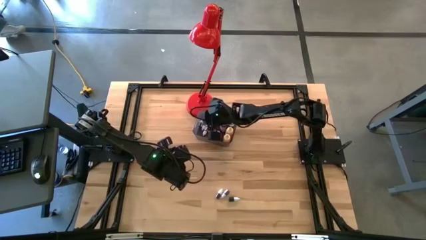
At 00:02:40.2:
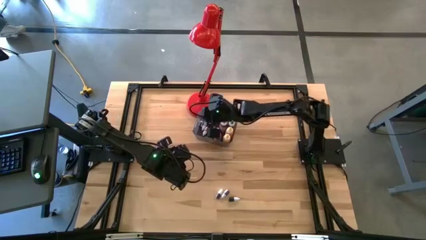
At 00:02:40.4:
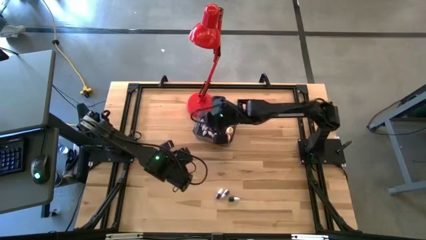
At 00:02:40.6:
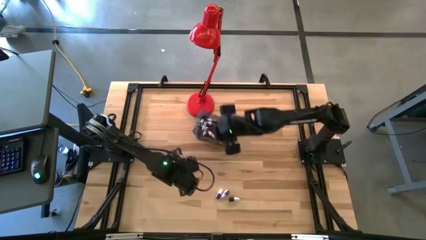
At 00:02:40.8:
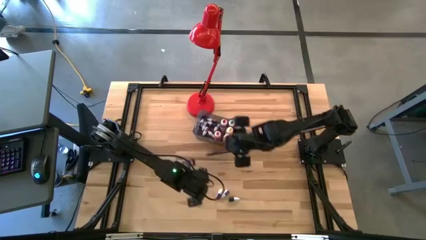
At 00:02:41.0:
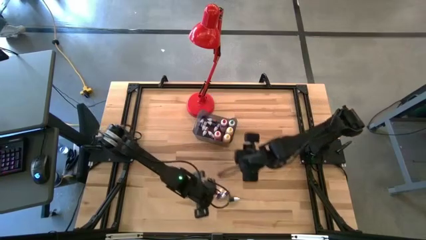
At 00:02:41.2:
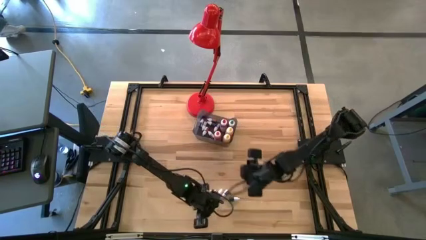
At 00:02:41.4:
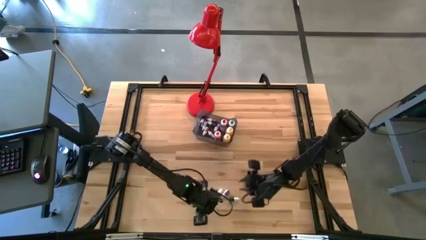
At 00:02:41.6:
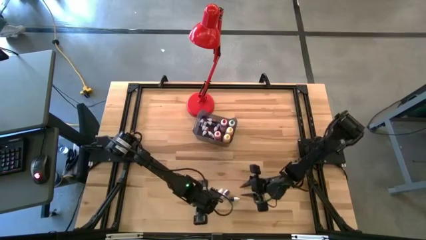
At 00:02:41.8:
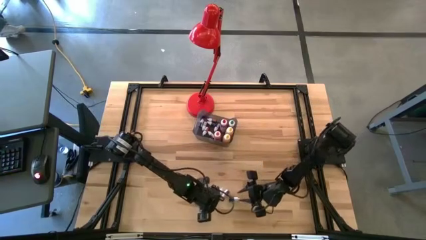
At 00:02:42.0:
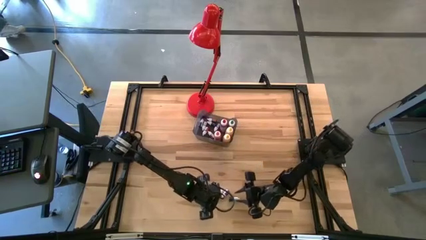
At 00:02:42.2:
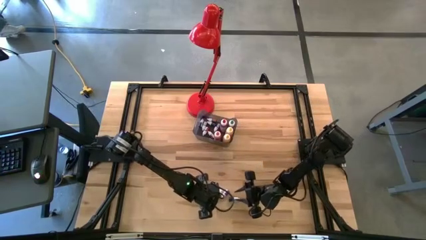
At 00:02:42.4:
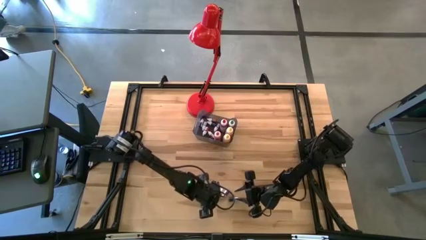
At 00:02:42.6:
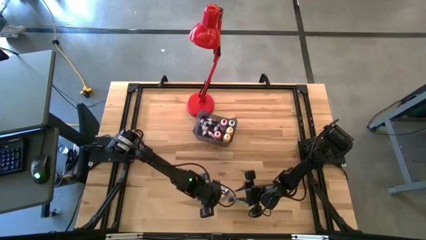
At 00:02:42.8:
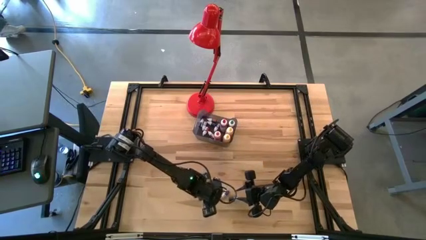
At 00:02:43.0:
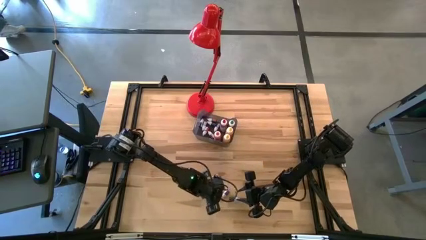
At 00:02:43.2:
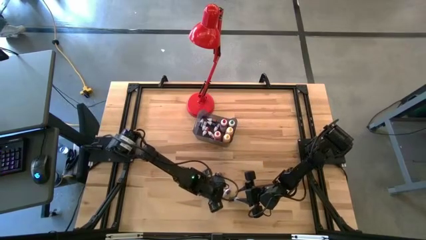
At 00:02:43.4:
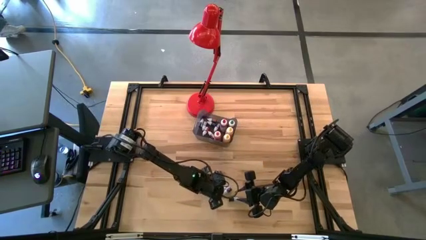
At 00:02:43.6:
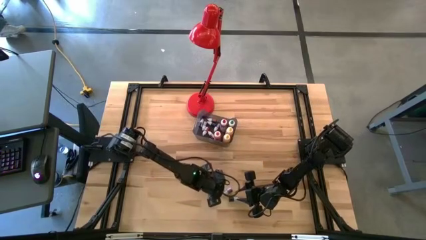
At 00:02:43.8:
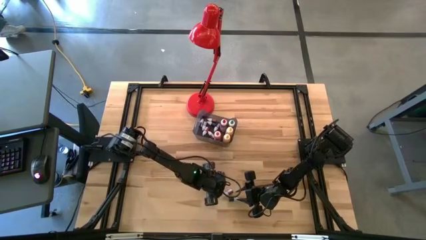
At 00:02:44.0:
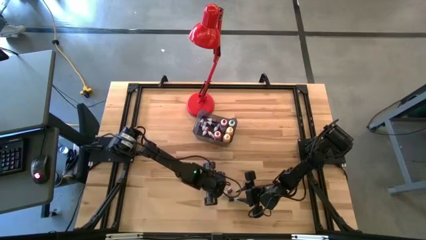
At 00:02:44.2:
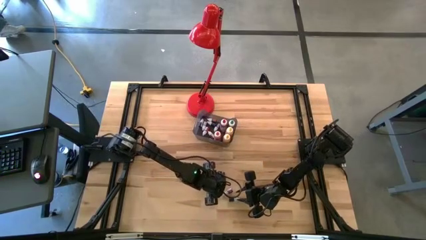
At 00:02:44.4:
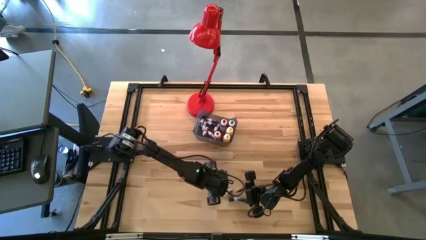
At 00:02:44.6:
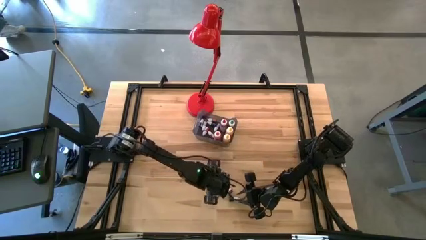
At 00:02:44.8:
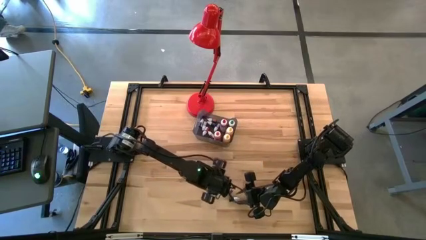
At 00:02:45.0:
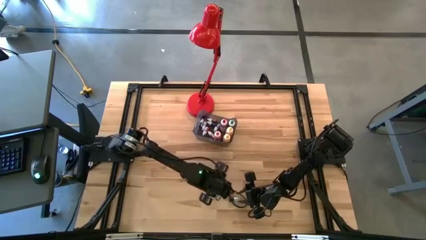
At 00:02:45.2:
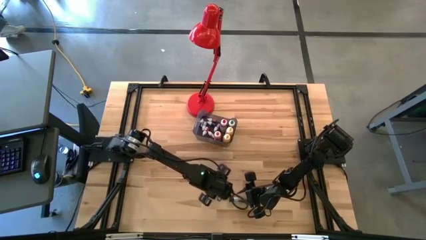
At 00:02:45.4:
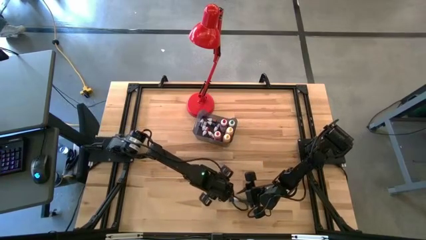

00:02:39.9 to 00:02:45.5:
Task: Pick & Place food coloring
Put the small pink food coloring bottle into the black bin

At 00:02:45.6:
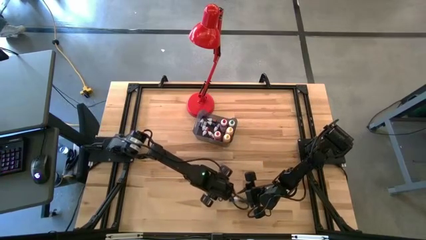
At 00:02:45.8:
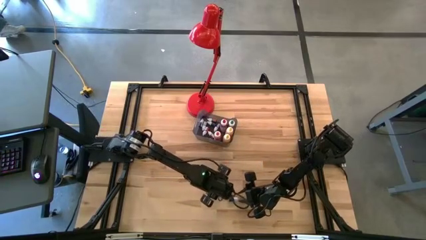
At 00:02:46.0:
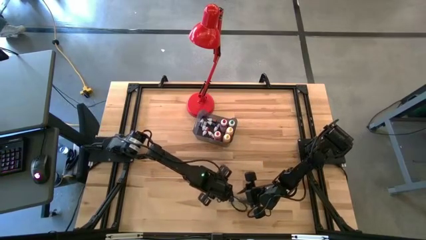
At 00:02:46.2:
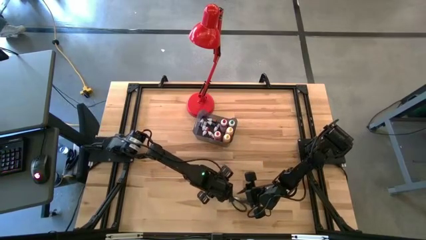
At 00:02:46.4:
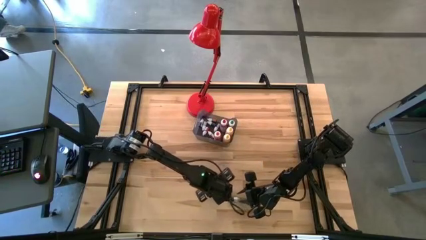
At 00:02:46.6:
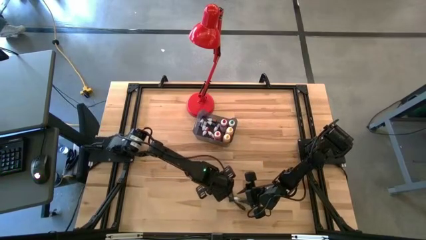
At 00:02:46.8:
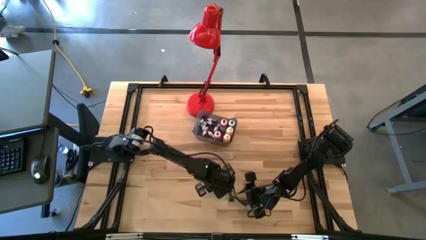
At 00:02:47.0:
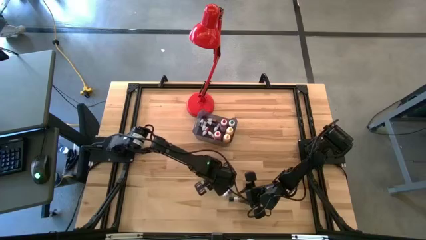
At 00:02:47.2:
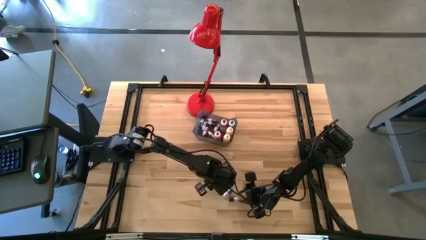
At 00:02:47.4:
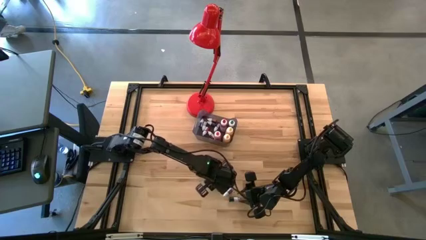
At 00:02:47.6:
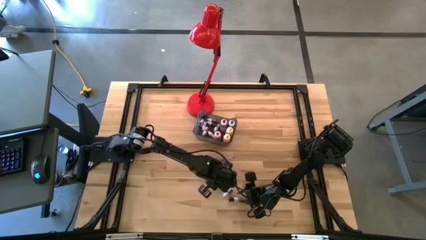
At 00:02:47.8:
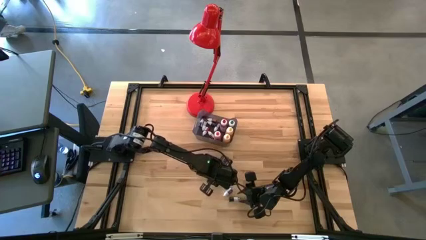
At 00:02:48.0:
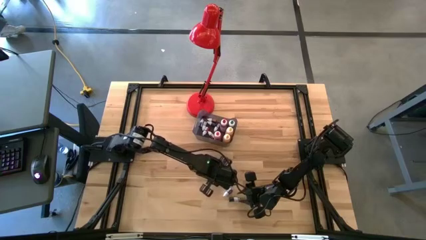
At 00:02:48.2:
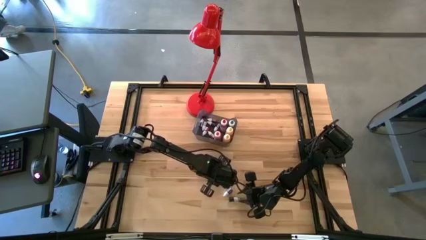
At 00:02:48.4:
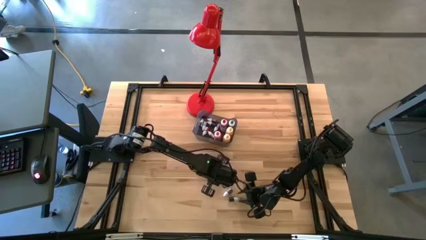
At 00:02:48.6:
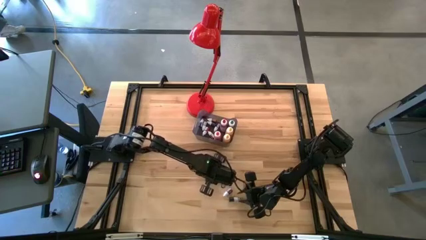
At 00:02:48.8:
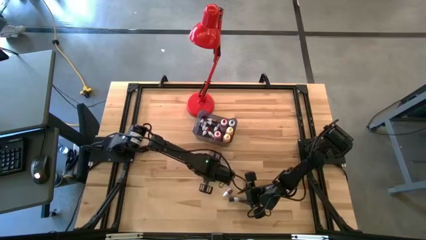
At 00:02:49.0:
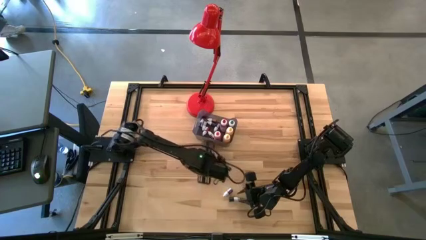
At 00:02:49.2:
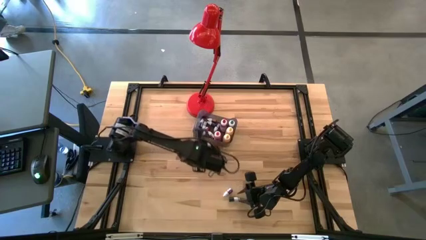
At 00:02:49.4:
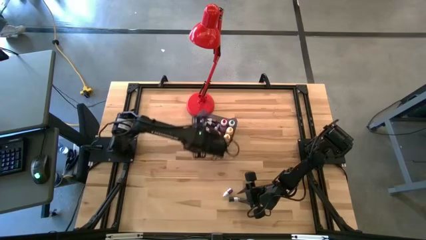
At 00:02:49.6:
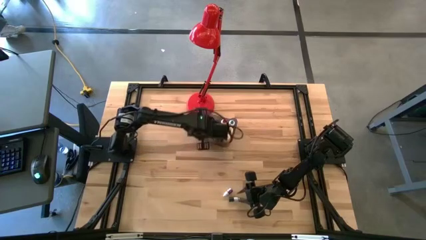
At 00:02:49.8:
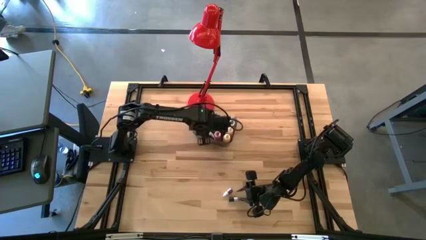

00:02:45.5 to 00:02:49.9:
Put the small pink food coloring bottle into the black bin

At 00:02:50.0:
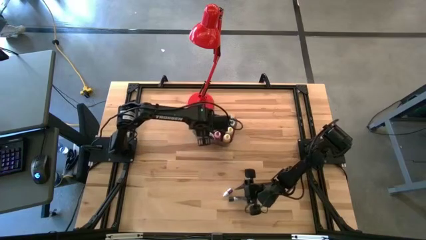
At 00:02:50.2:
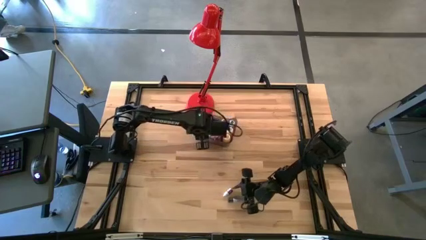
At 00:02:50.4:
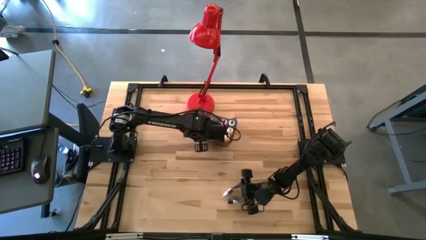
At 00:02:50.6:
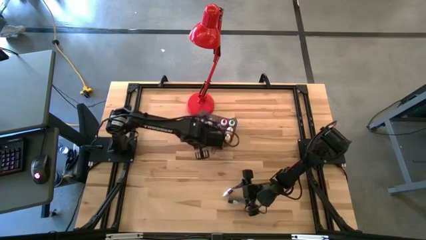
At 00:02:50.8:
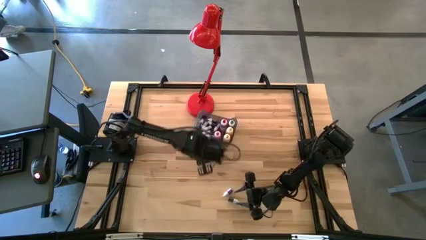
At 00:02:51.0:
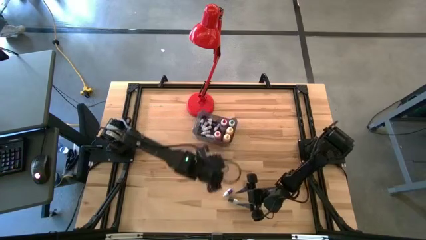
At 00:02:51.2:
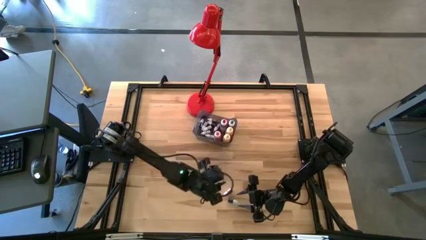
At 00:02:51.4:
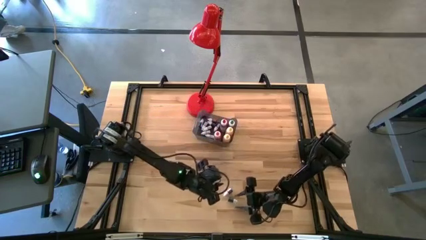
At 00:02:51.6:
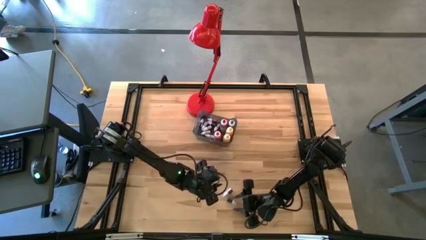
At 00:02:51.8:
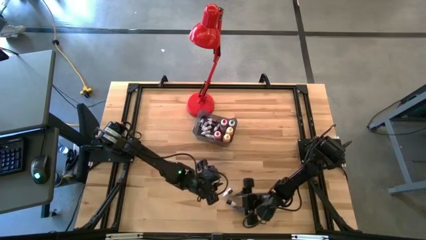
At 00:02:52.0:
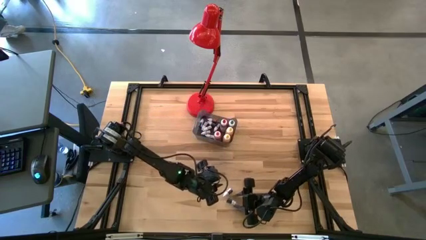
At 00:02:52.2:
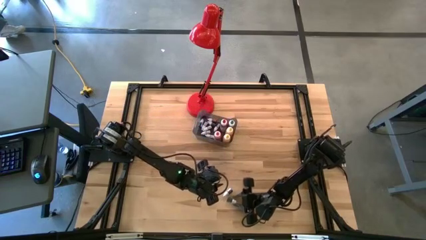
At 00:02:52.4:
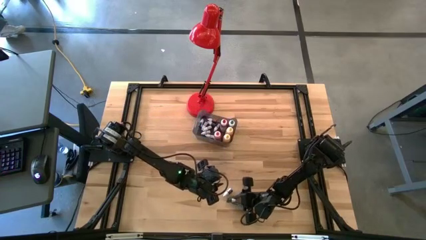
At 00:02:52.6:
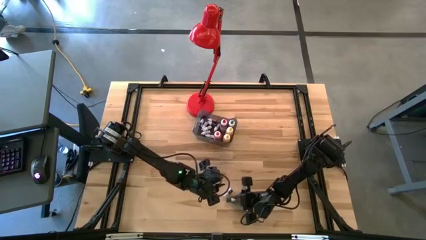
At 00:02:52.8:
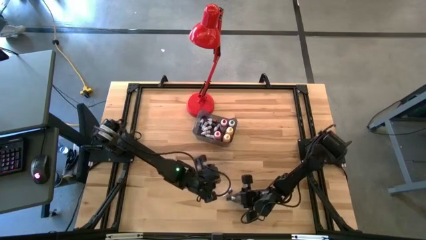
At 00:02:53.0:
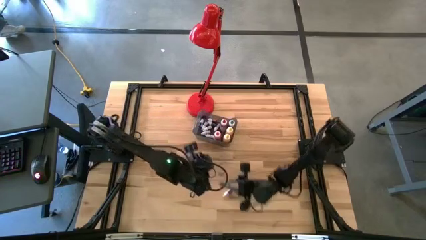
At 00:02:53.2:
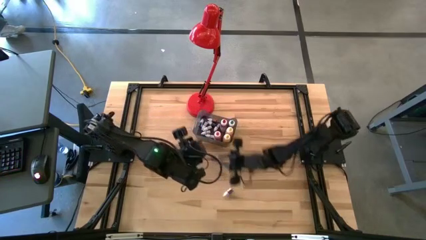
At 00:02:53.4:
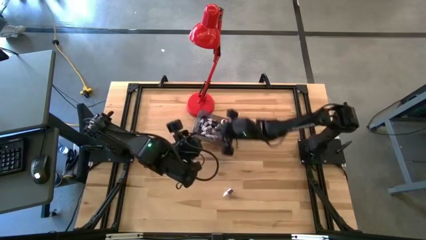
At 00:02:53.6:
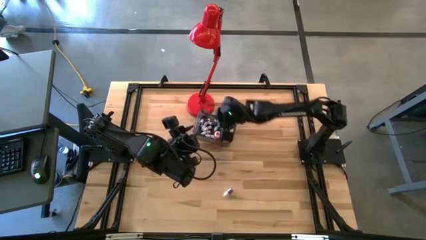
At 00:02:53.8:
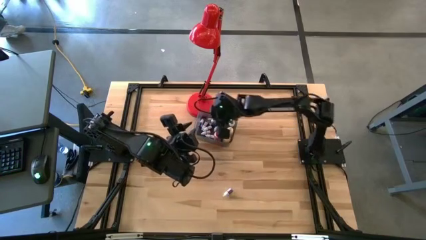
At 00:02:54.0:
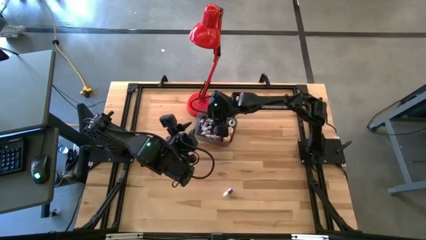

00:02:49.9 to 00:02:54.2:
Put the small green food coloring bottle into the black bin

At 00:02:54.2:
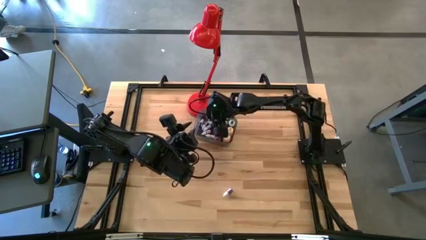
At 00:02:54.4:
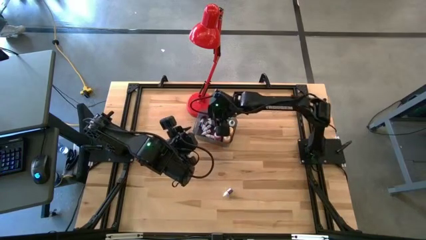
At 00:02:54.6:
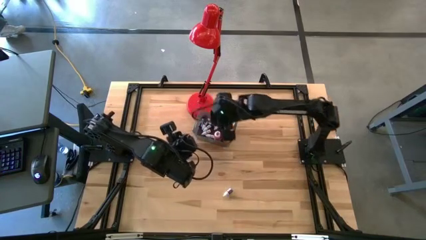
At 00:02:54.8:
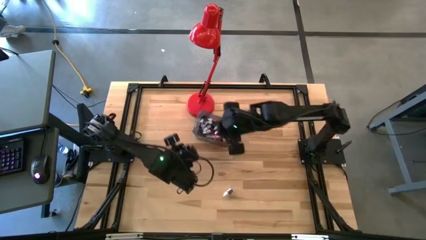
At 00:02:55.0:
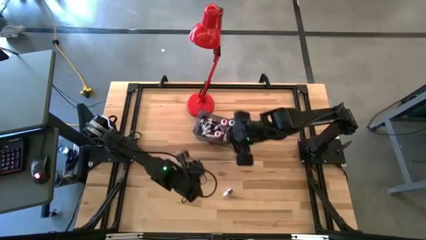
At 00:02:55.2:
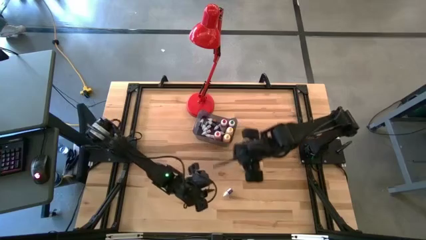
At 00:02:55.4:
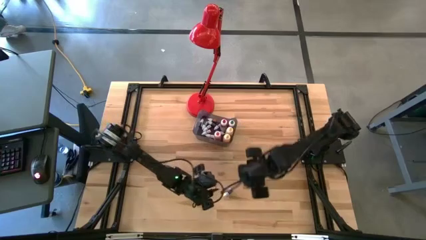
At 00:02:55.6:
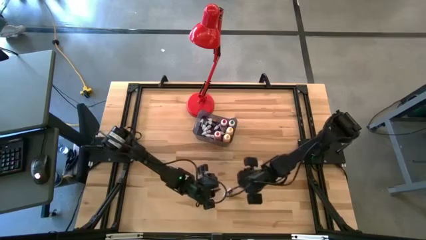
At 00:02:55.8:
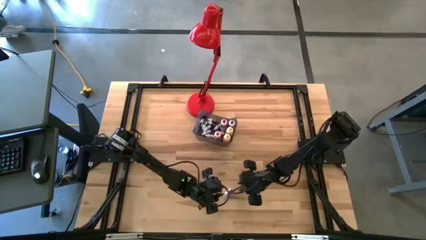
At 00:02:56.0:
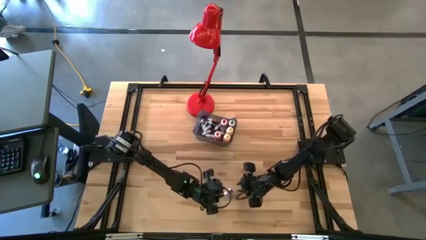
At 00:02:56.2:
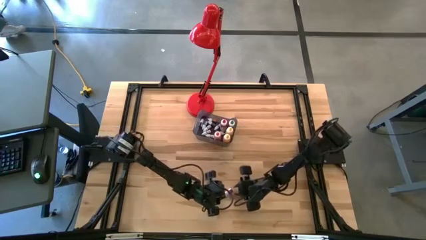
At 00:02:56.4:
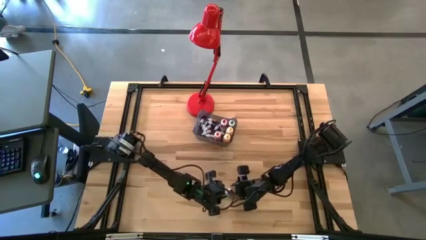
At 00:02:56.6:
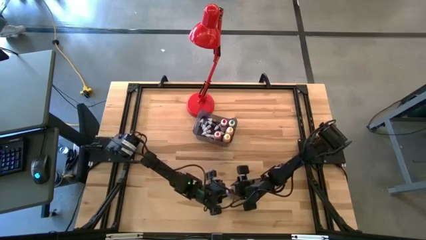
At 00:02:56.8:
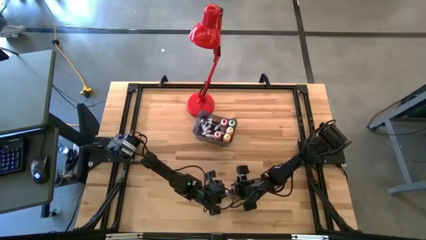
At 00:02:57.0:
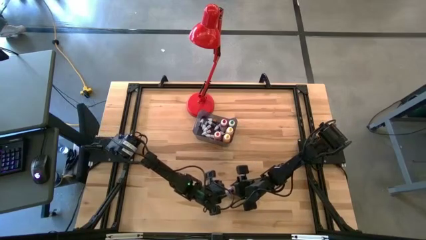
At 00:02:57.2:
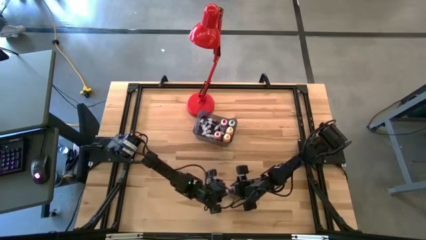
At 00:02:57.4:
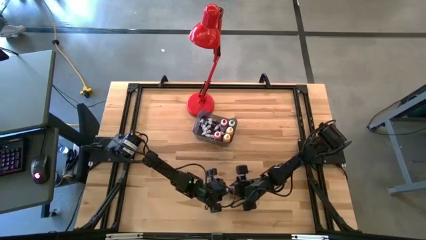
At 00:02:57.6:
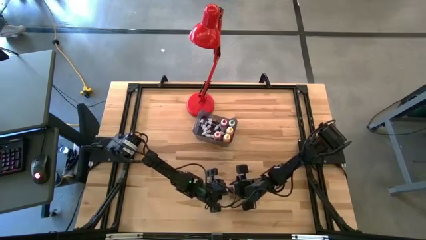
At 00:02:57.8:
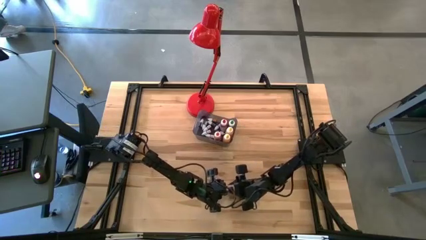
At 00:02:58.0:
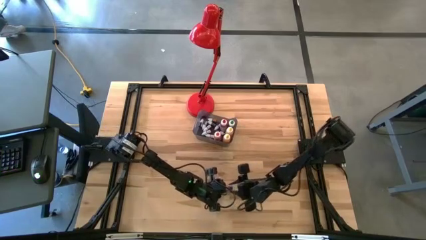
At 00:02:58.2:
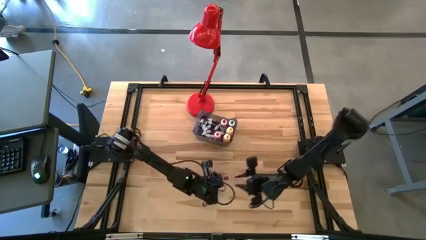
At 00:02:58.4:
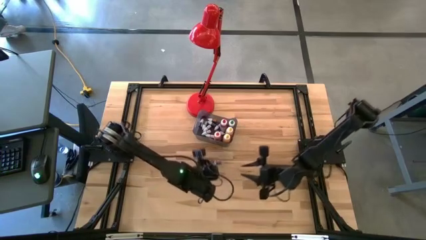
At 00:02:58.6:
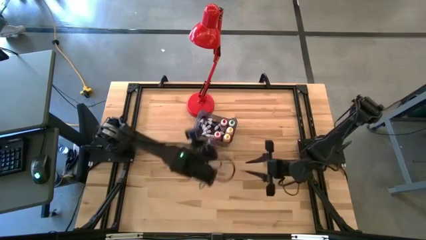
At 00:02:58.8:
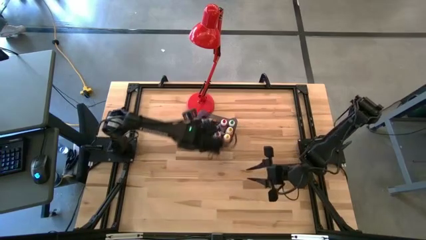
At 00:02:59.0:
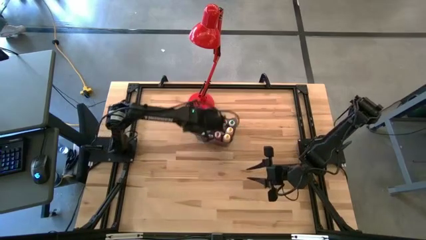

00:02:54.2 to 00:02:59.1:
Put the small purple food coloring bottle into the black bin
